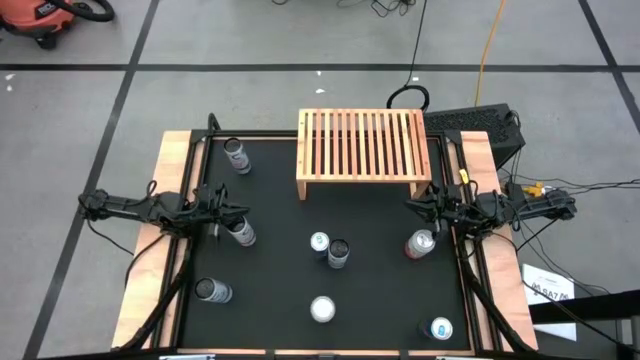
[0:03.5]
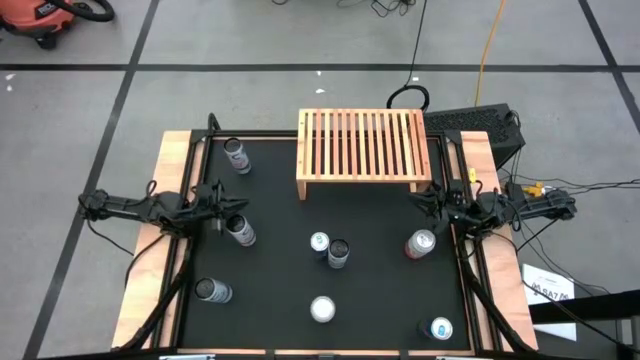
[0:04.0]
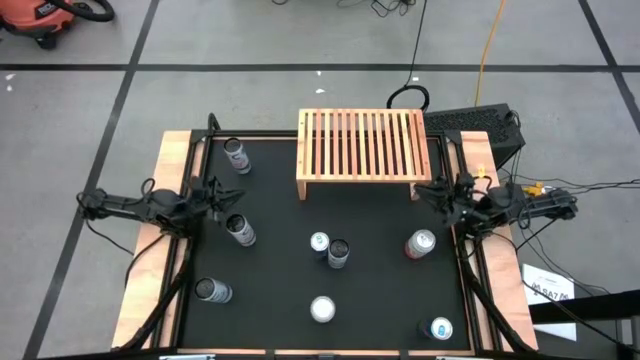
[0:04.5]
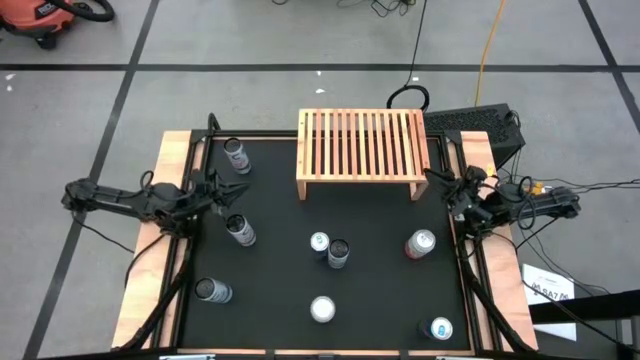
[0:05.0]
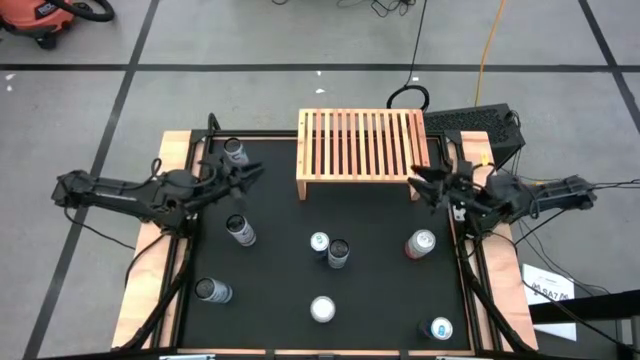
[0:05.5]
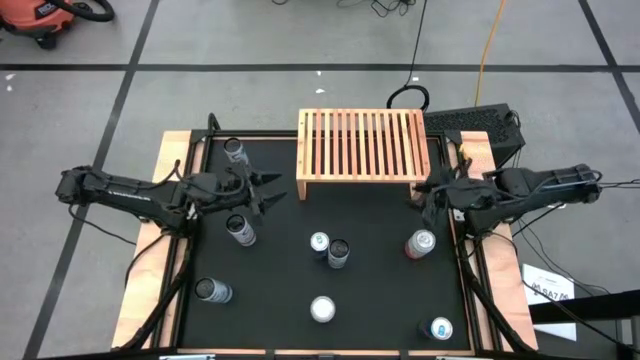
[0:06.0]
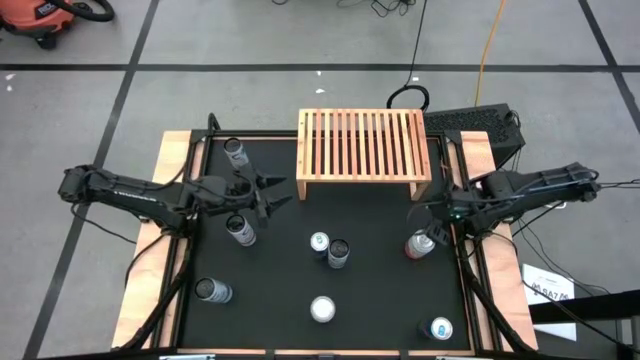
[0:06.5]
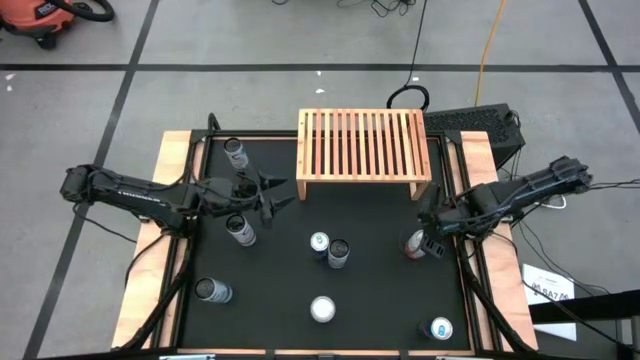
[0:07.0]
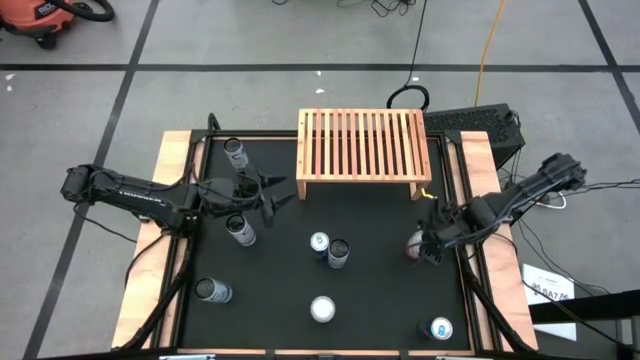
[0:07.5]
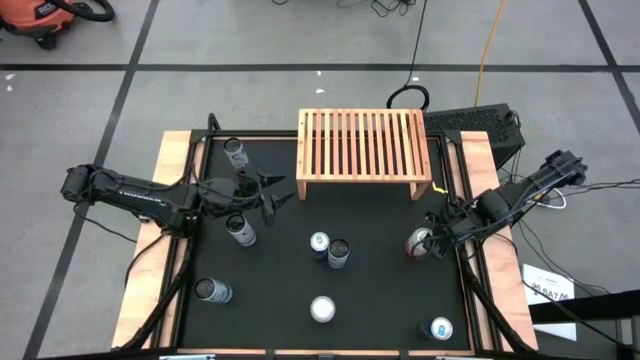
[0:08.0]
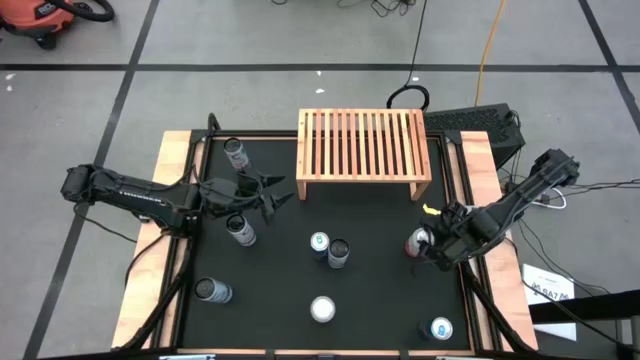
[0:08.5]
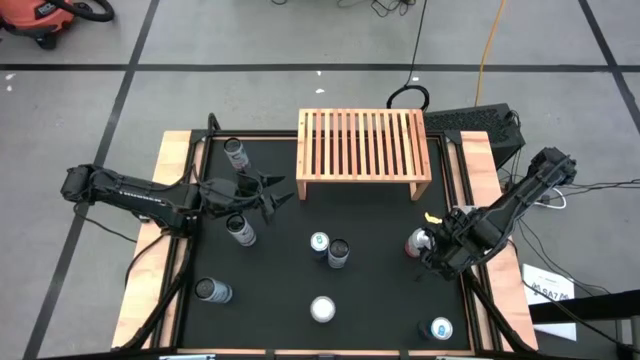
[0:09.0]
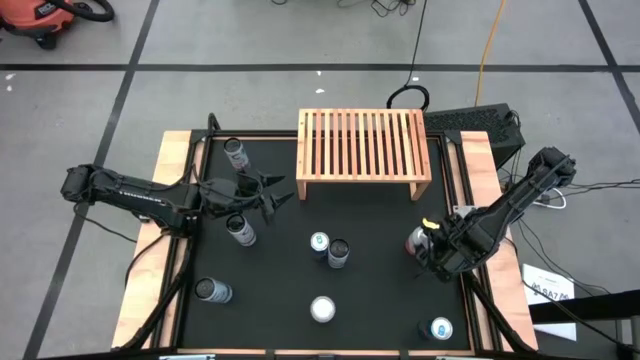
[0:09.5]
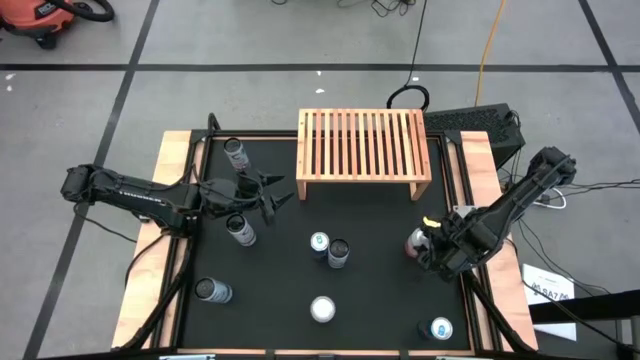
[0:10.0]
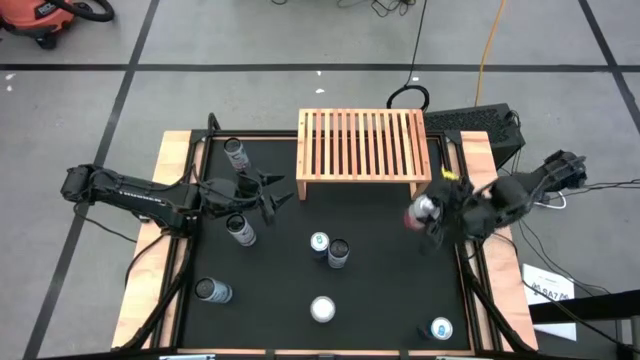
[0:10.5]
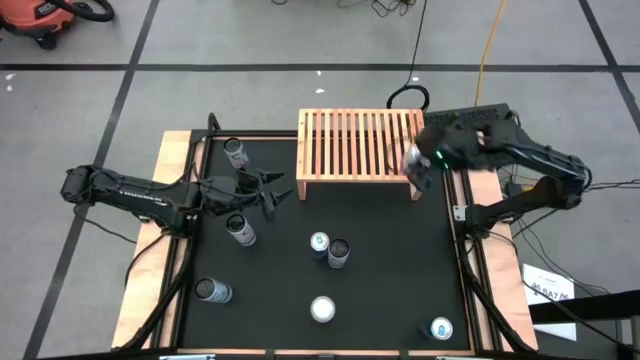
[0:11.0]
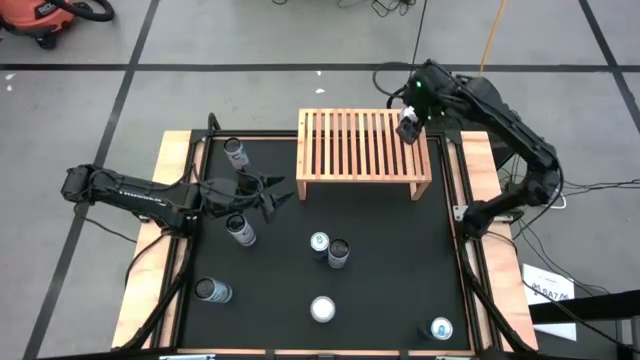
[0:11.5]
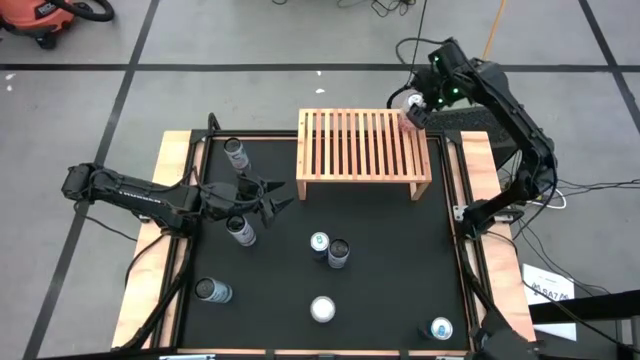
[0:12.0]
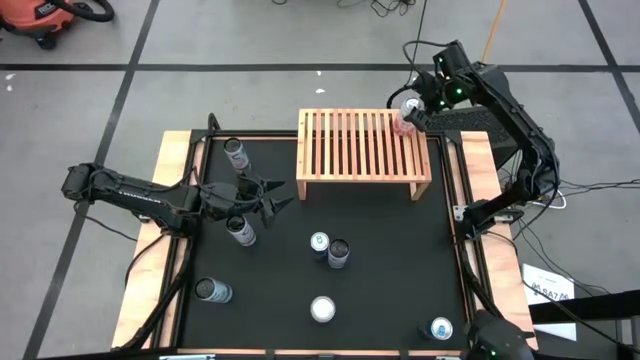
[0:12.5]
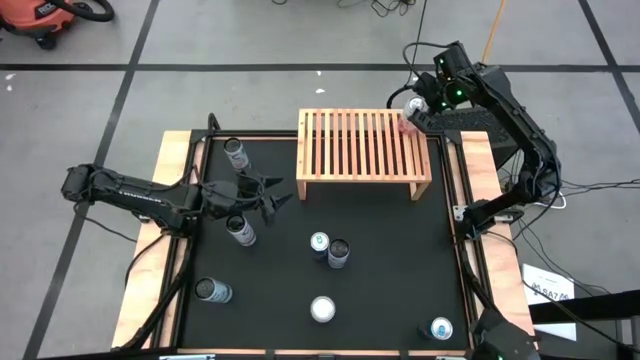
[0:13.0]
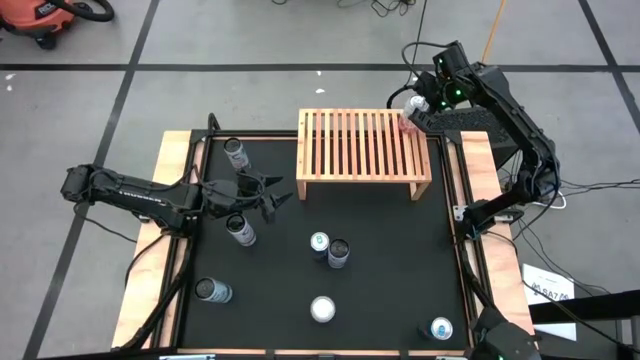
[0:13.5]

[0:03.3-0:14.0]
Task: Place canned beverage on shelf
Put the top pink soda can on the shelf

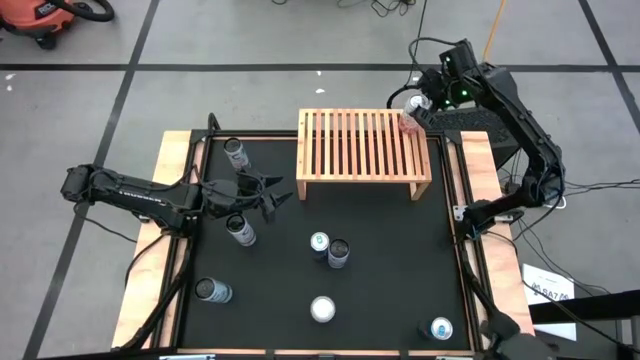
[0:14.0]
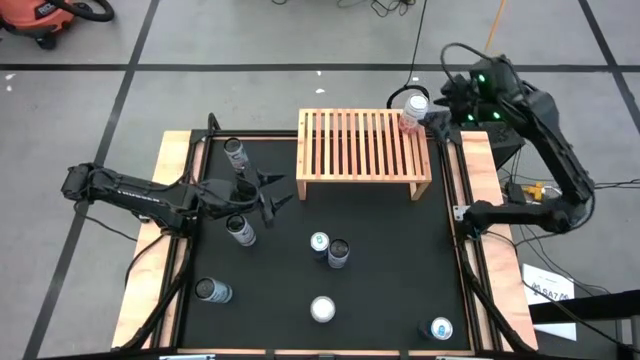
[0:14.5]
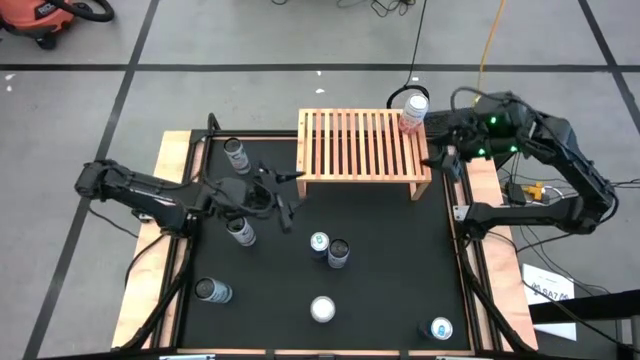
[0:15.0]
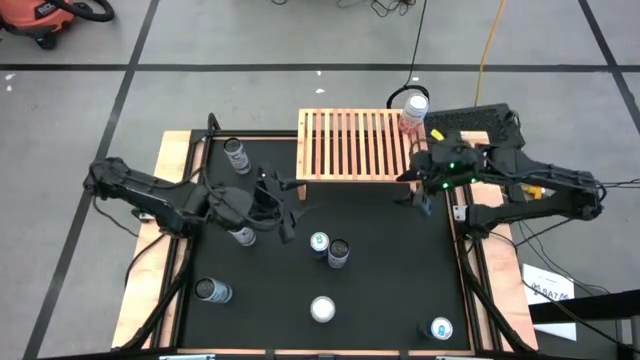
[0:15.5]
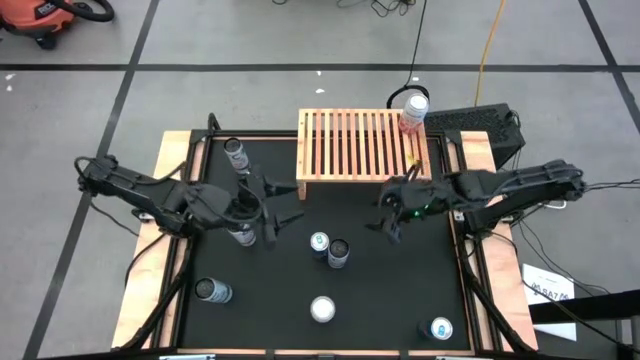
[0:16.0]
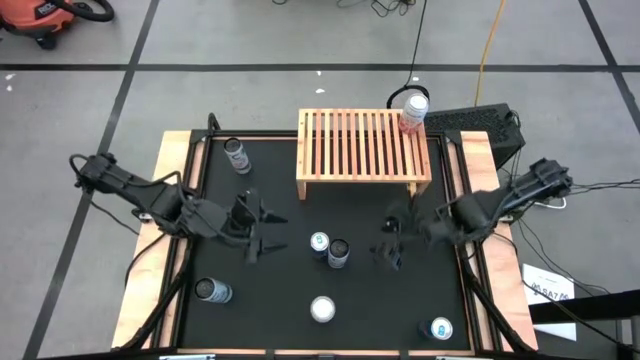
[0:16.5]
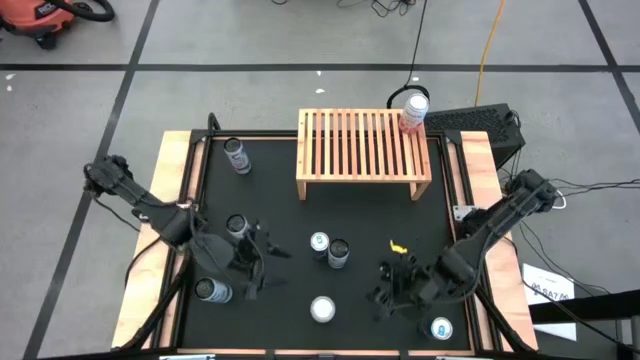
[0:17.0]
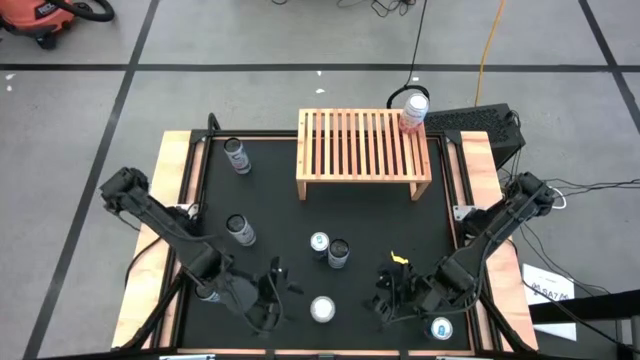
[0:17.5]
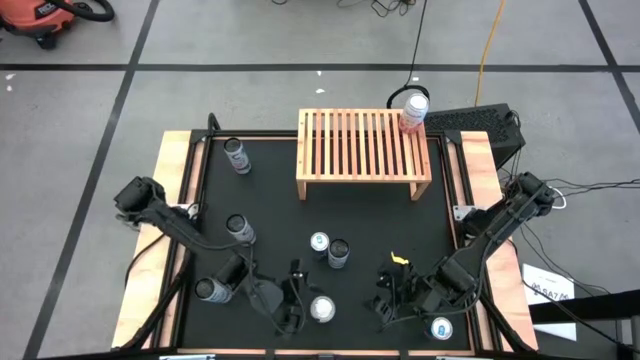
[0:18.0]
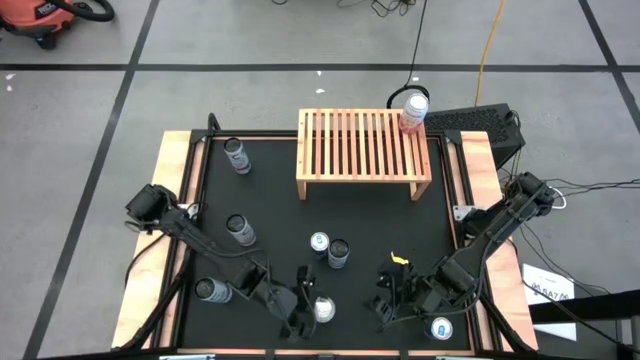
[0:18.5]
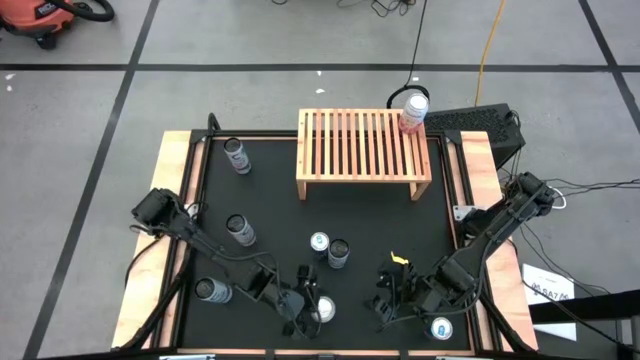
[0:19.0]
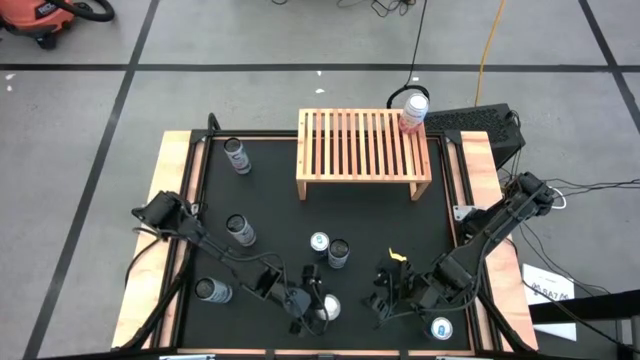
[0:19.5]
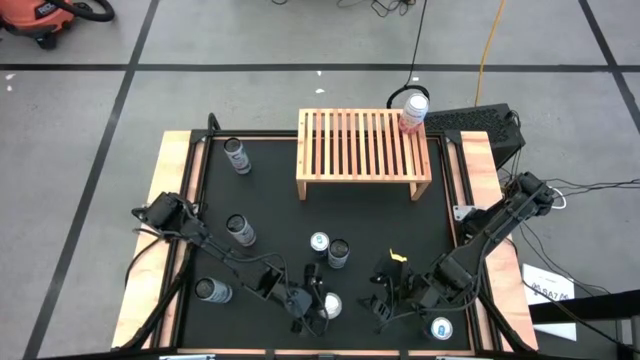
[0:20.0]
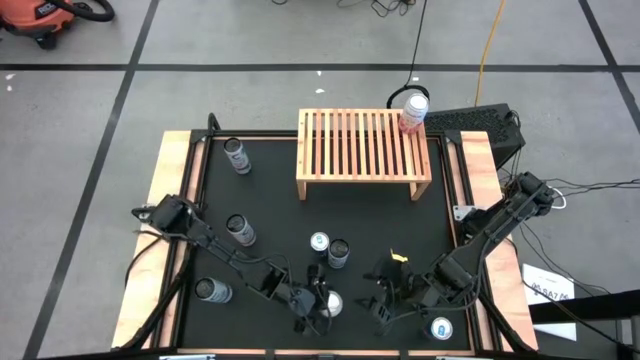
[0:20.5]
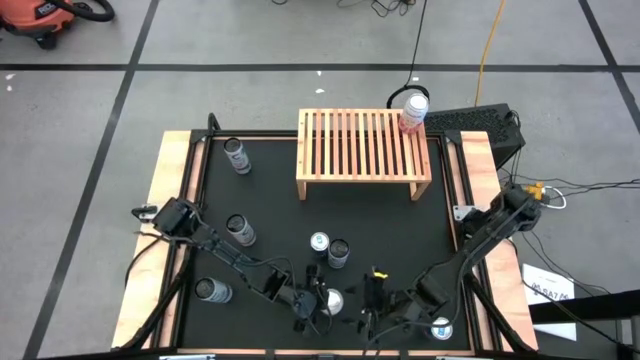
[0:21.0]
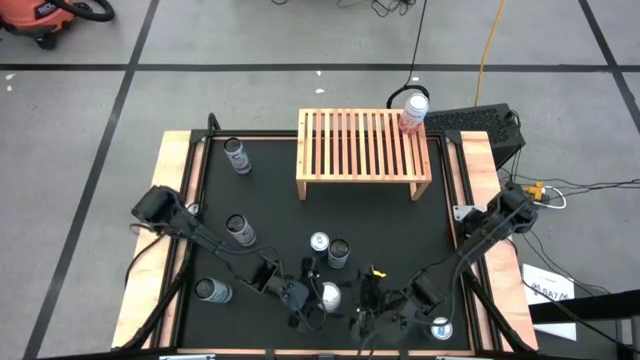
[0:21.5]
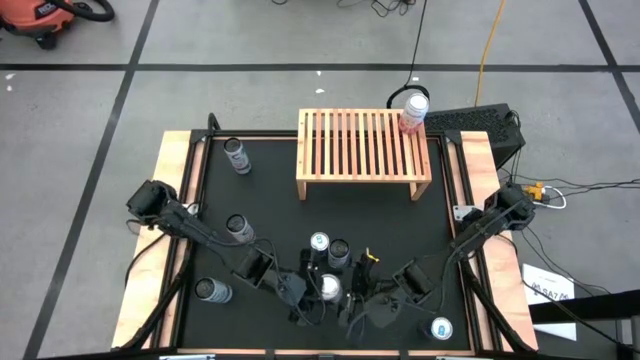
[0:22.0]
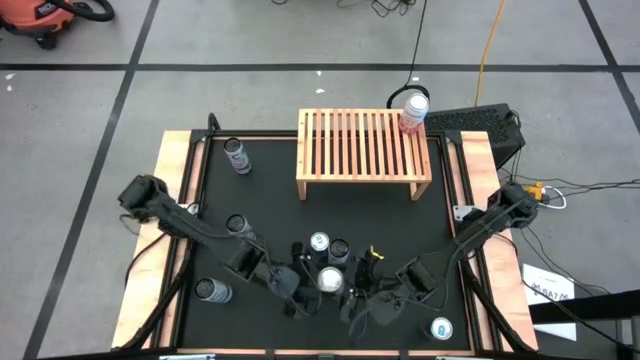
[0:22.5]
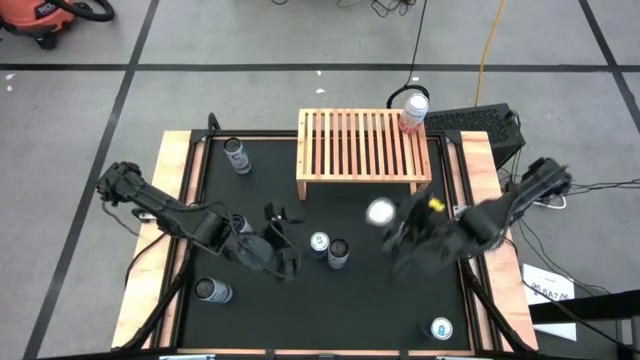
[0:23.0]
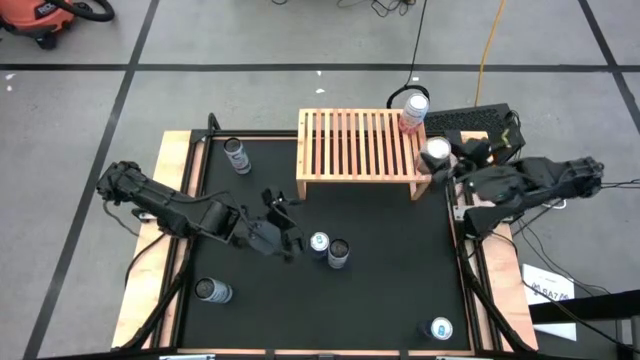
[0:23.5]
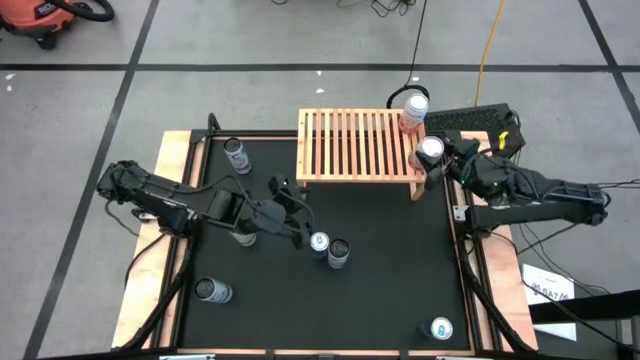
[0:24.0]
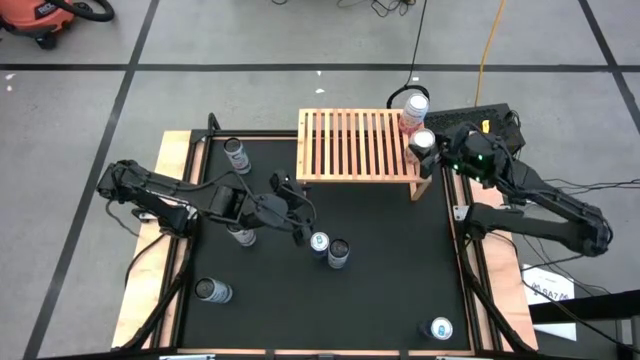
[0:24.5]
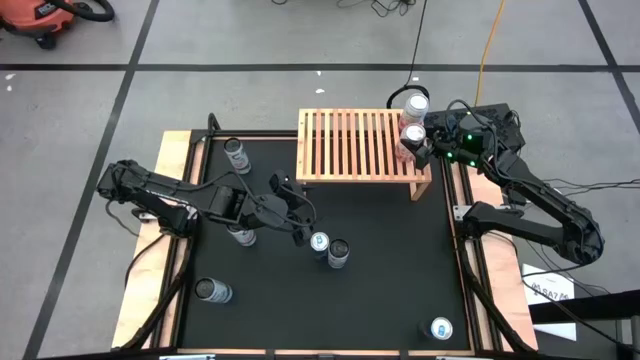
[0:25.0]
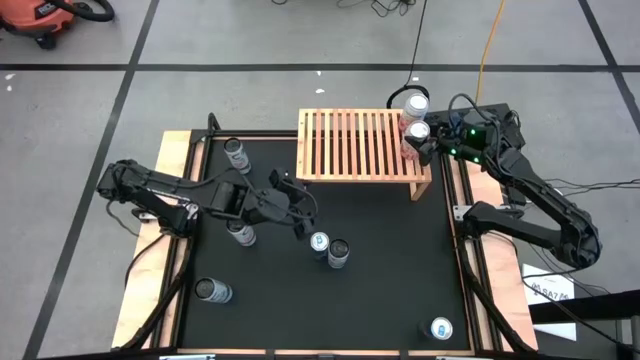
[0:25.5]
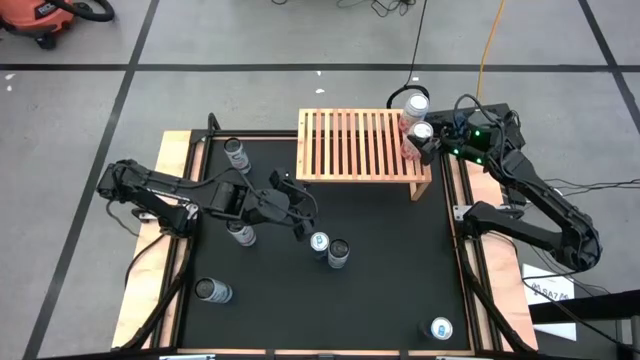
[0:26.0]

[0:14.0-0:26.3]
Put the pink soda can on the shelf
